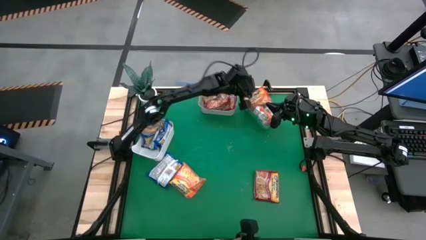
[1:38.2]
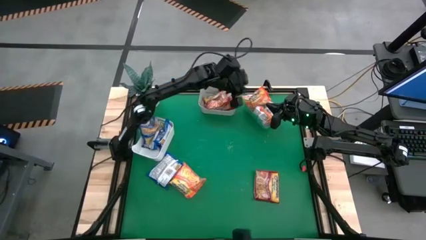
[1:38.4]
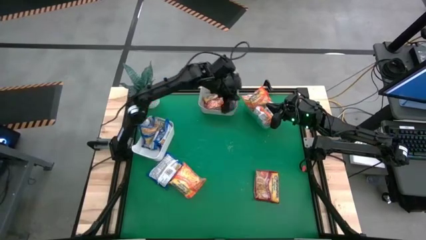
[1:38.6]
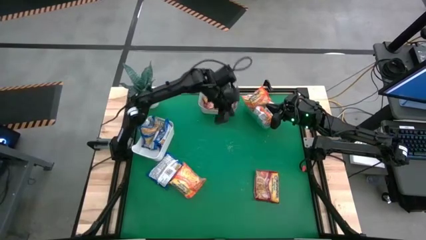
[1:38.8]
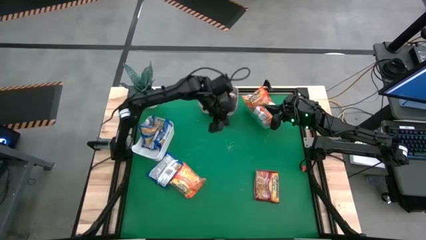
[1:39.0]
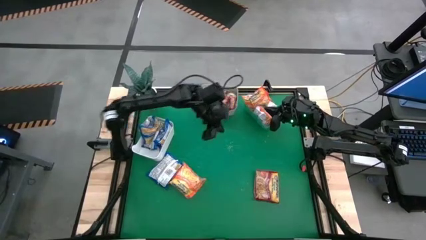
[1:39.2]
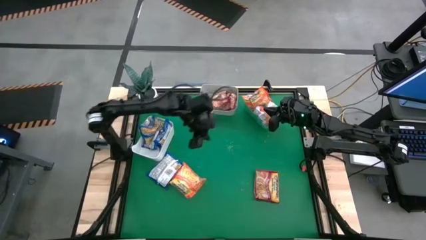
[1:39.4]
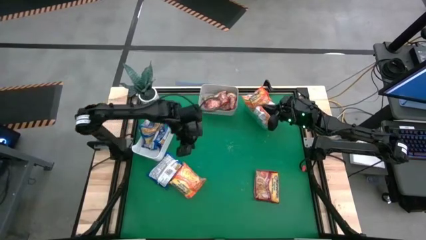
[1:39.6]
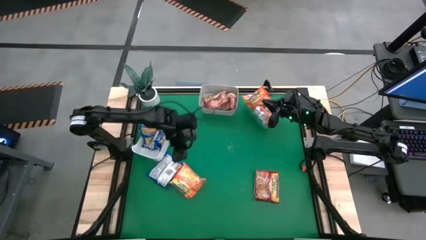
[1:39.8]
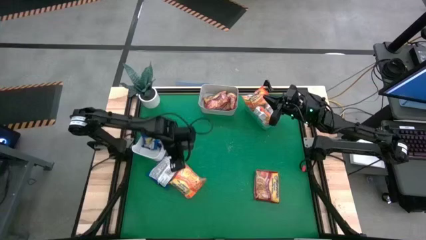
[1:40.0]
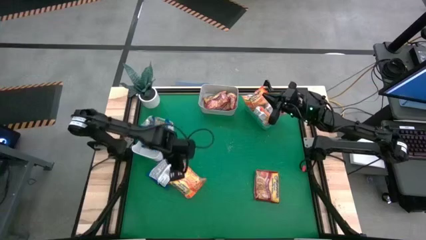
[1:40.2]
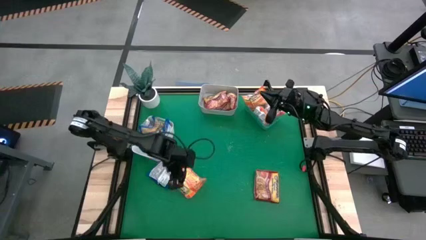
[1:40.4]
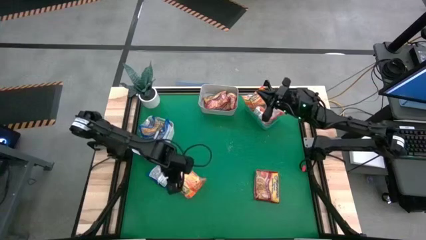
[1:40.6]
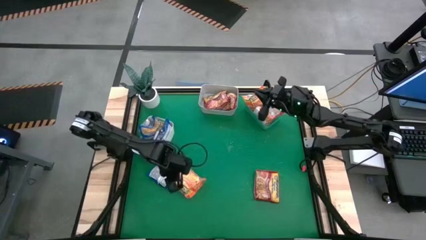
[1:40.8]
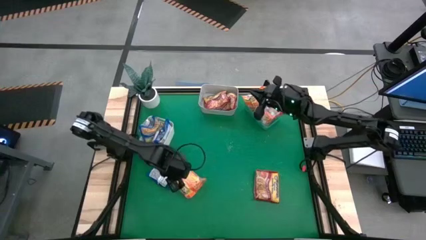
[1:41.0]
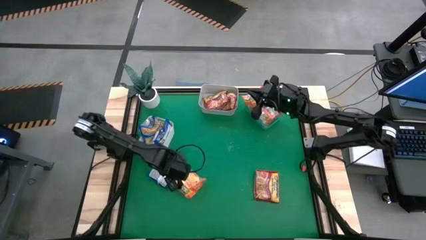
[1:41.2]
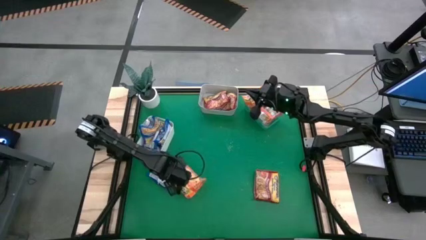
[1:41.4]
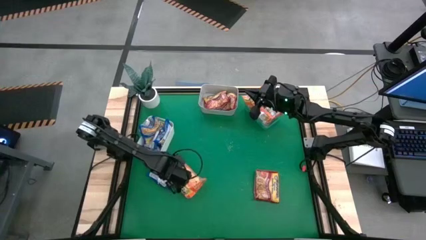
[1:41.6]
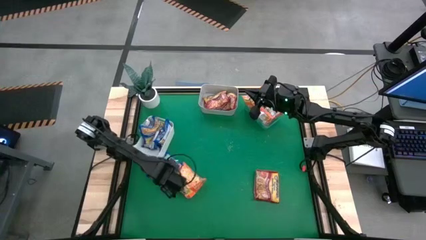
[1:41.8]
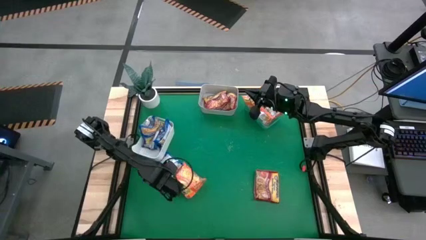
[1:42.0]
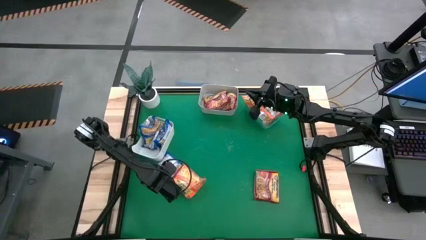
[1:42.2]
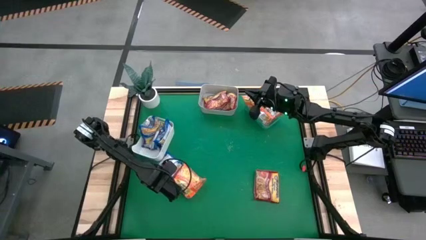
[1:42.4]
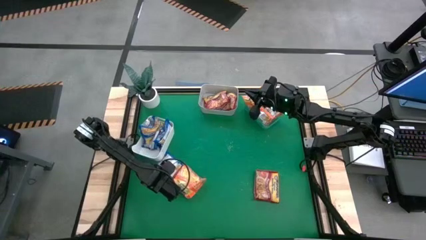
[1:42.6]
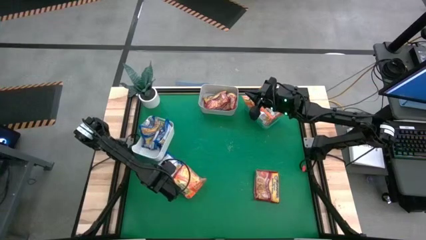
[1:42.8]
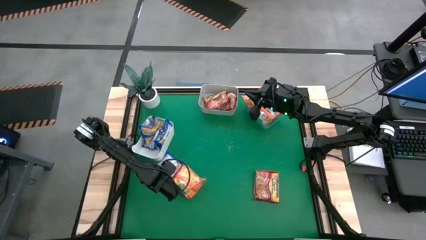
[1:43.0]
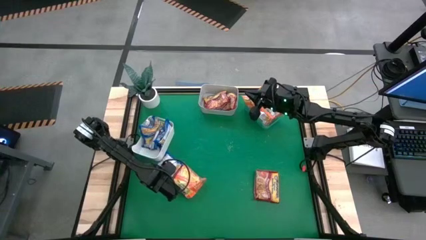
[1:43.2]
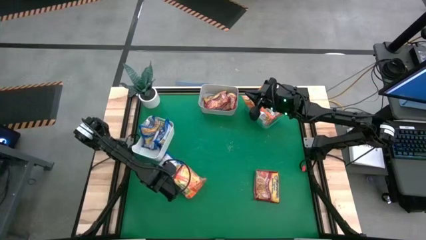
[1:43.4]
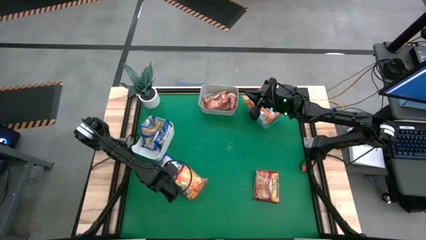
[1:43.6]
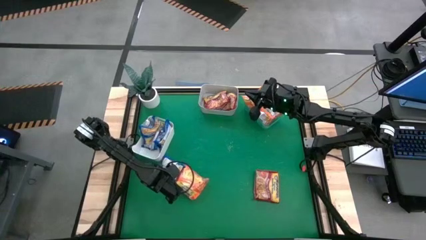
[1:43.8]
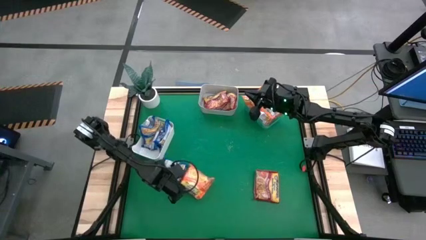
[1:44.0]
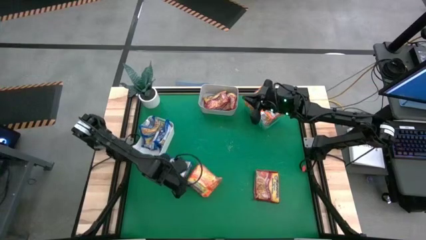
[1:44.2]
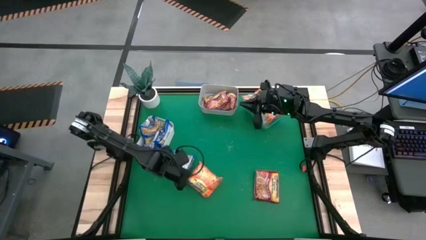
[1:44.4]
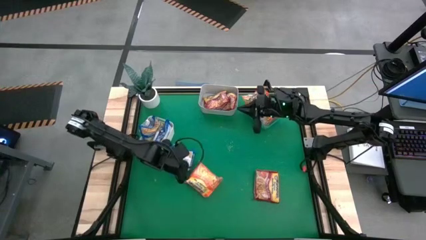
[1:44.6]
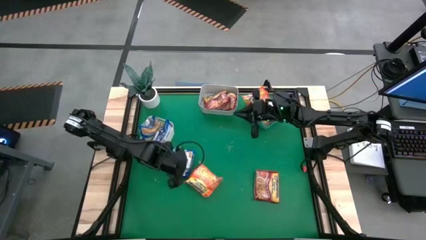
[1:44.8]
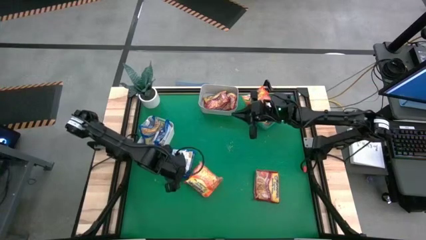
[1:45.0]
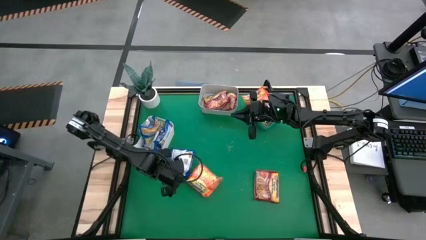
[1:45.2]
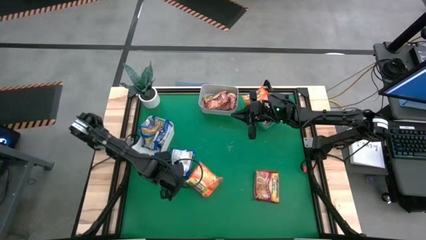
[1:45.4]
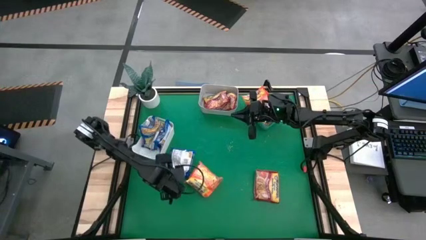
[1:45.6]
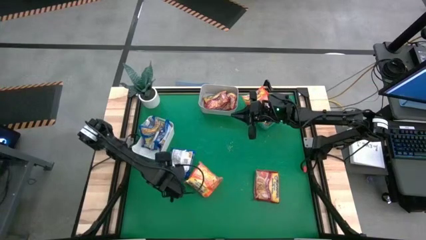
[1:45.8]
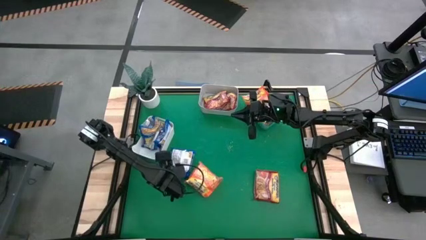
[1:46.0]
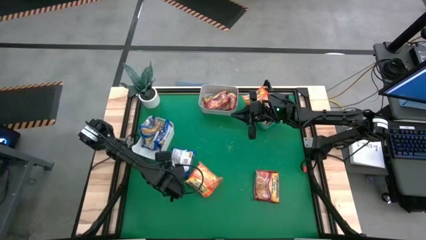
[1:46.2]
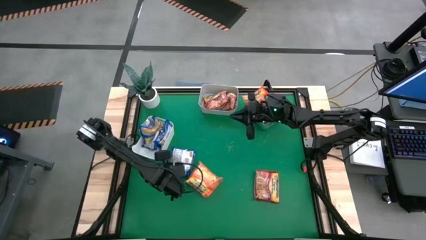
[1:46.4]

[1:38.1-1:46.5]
Task: Sort Maruchan noodles
Put the blue noodle pack into the white bin

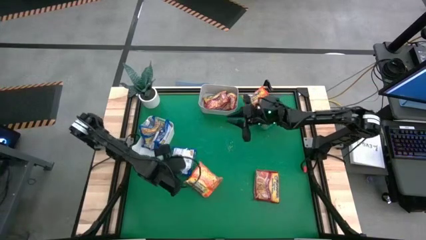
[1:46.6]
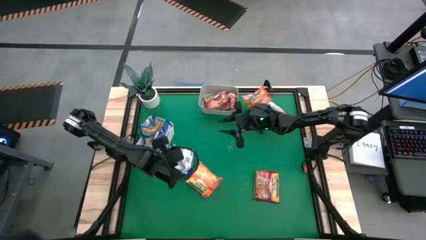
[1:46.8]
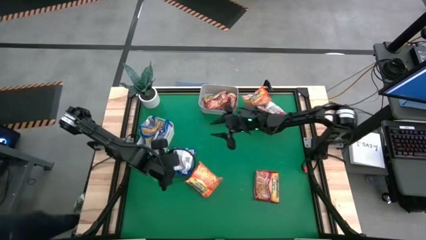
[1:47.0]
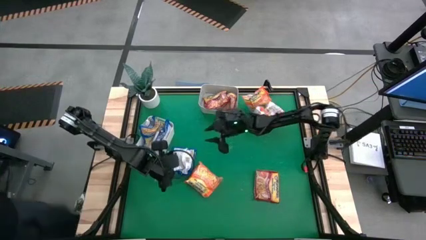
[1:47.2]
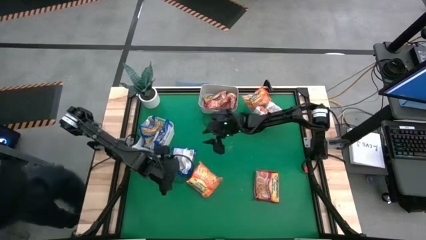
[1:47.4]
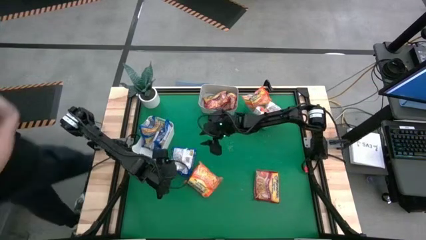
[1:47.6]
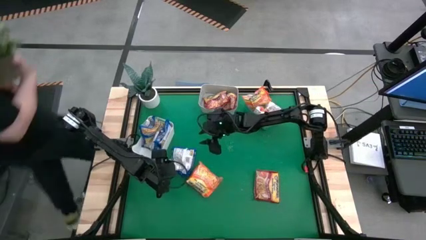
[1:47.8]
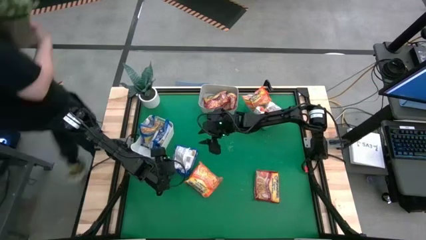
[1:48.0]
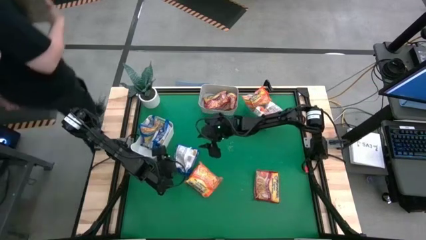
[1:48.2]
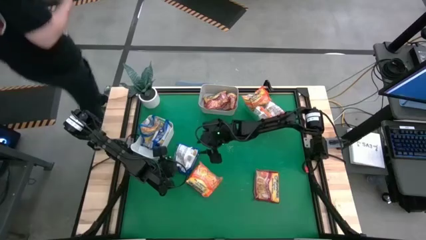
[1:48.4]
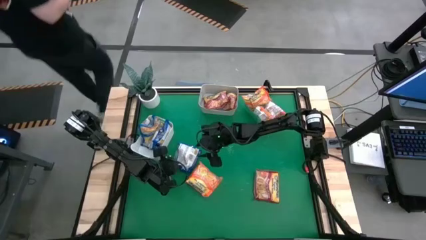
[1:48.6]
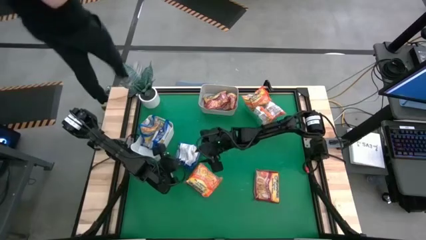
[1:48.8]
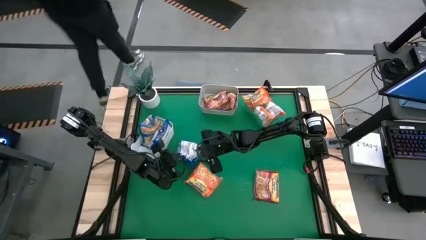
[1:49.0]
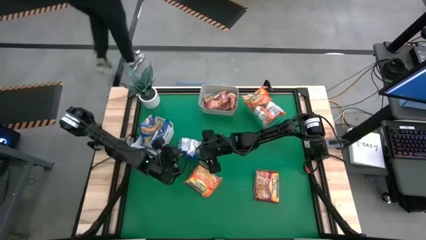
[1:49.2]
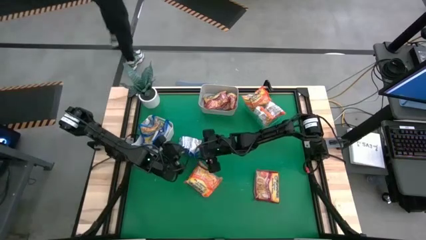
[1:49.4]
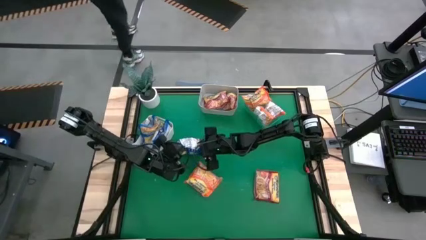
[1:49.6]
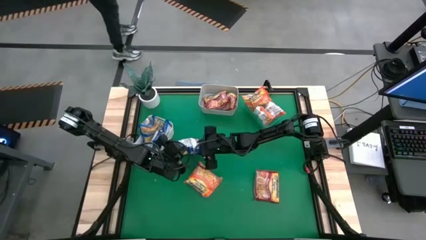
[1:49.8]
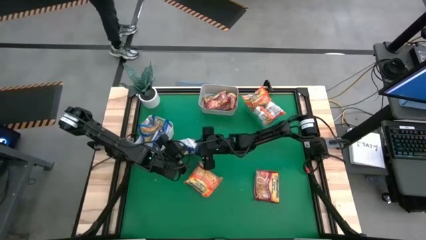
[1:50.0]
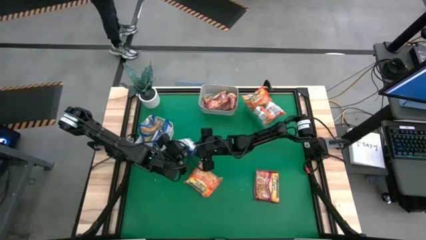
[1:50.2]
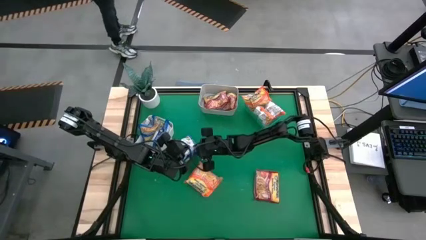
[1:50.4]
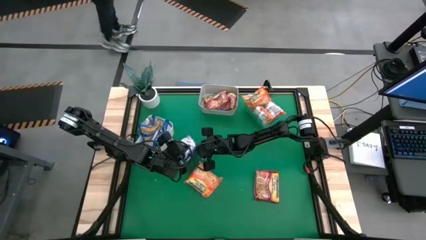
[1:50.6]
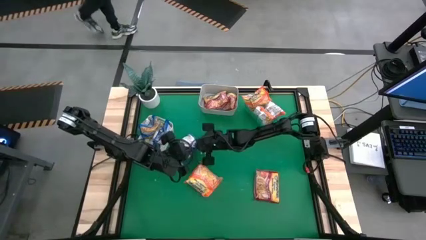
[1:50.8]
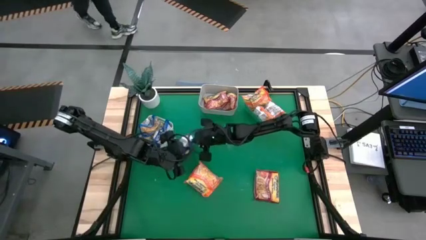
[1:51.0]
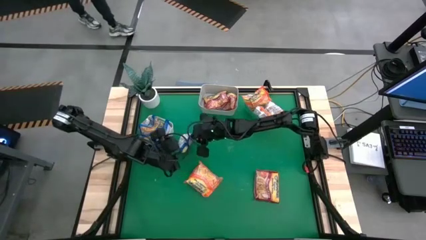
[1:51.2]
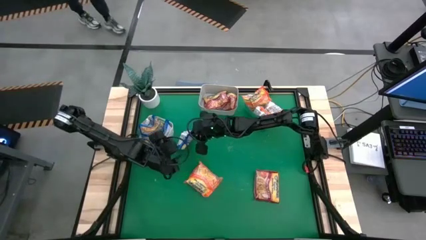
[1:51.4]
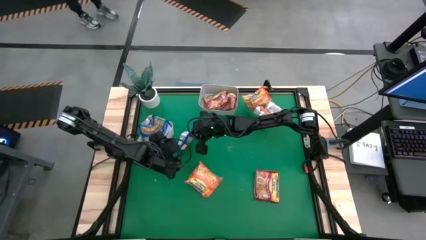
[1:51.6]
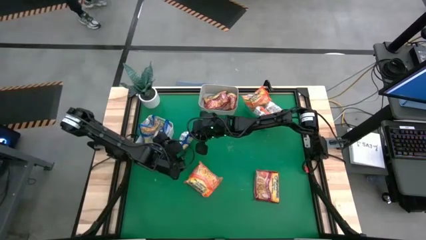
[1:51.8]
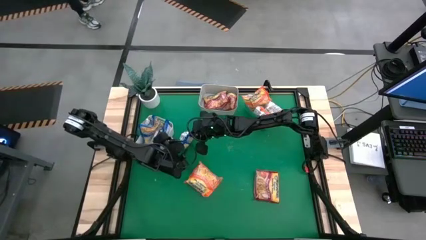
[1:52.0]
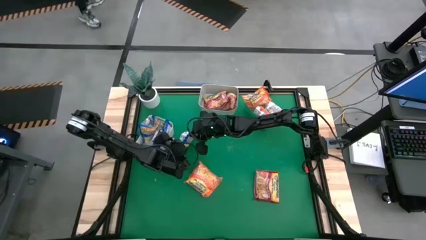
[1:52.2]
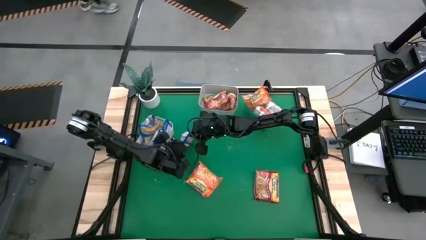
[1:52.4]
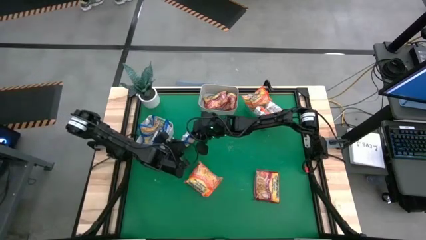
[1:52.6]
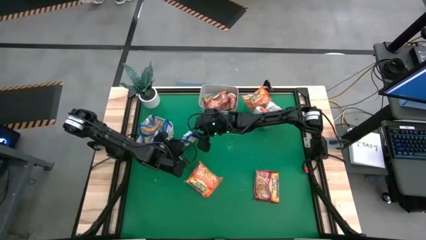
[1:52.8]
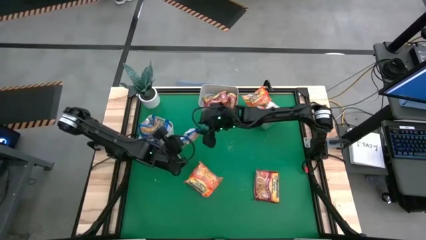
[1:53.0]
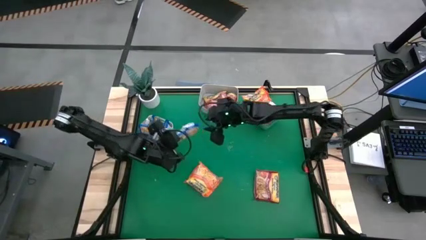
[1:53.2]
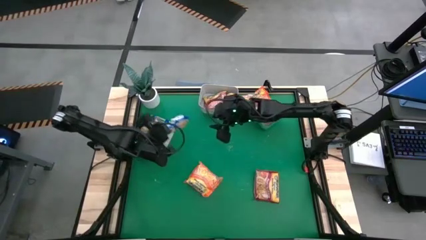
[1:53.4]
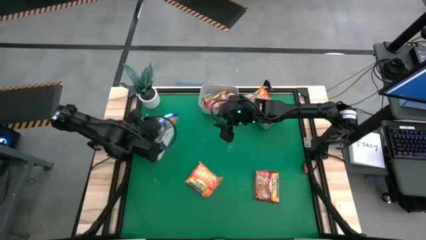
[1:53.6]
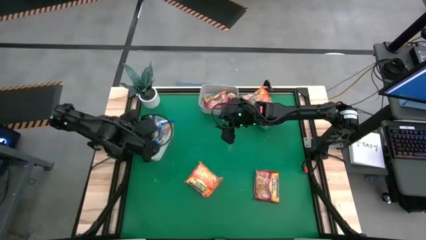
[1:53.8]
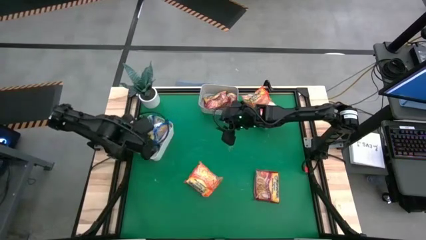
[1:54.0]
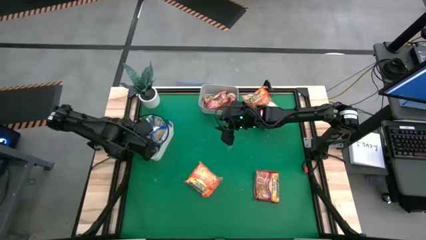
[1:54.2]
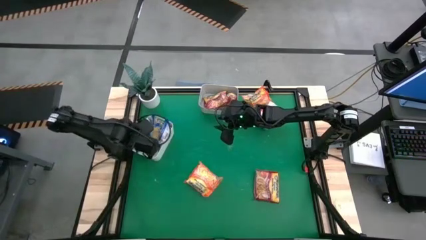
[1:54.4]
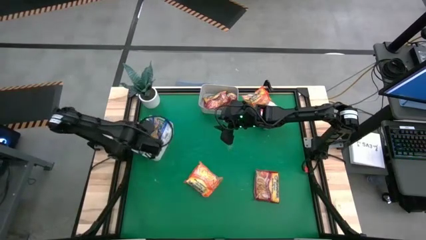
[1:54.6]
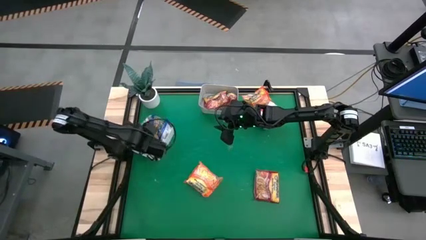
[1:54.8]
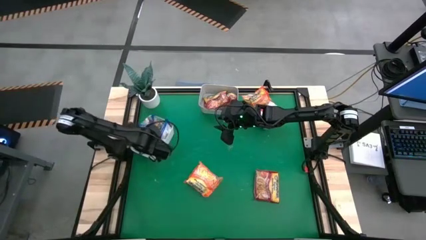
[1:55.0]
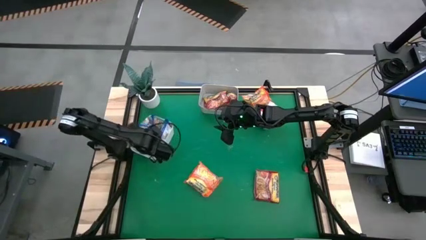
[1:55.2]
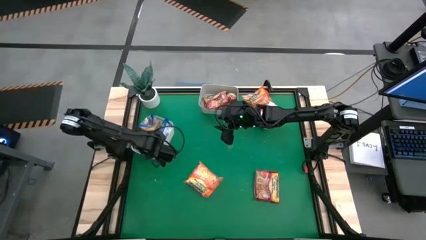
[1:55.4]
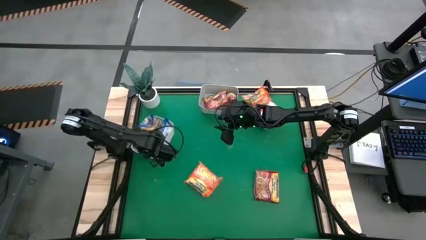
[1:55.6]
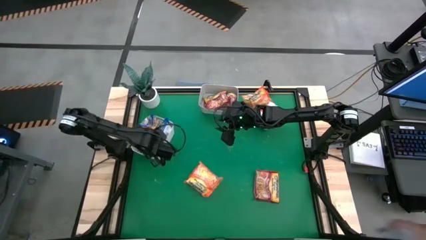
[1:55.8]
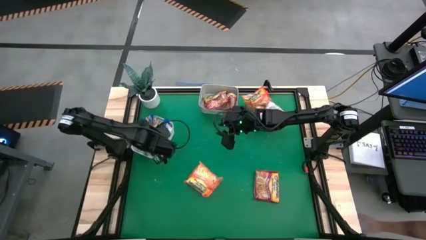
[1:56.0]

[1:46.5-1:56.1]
Put the blue noodle pack into the white bin
